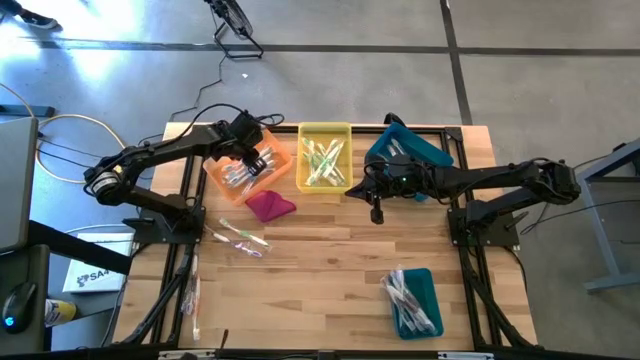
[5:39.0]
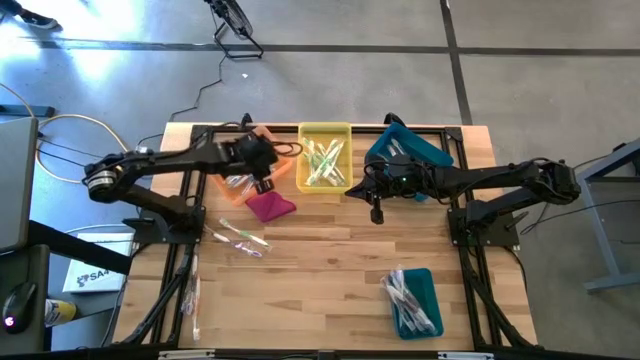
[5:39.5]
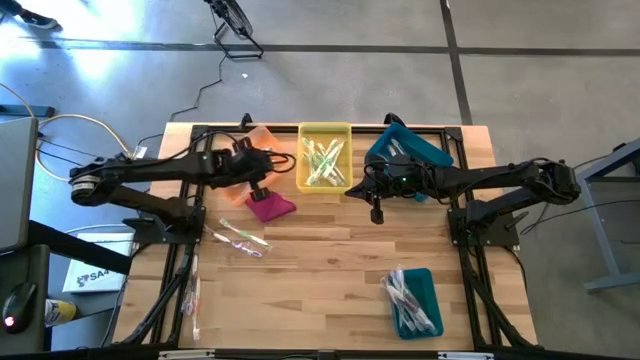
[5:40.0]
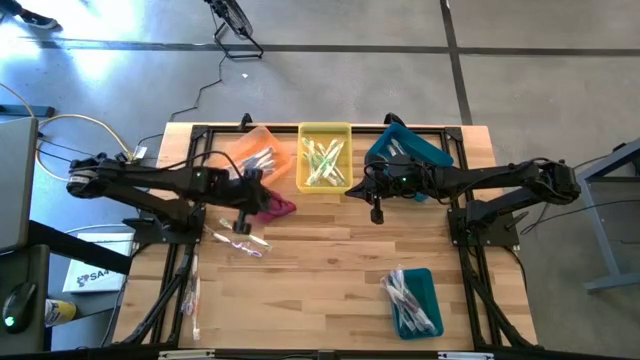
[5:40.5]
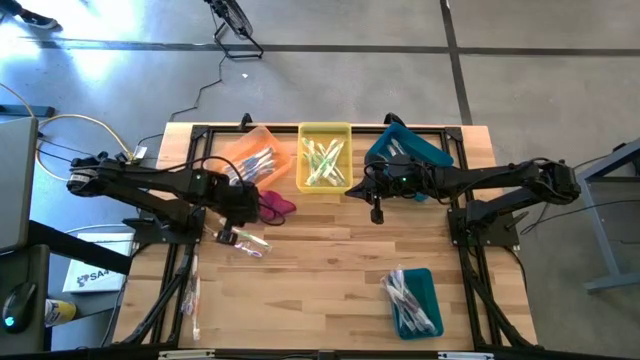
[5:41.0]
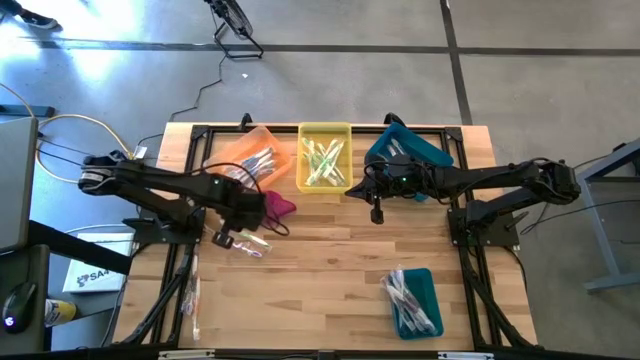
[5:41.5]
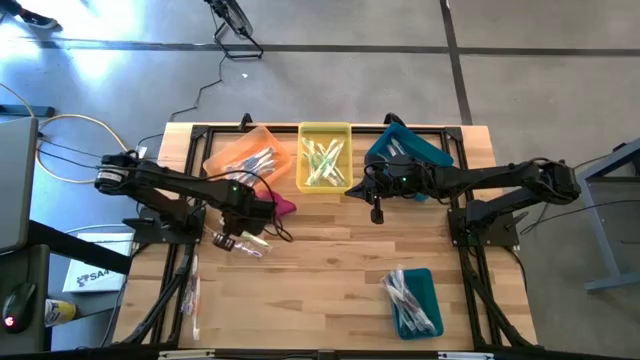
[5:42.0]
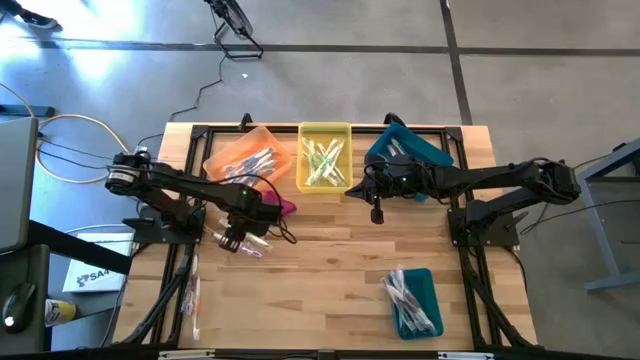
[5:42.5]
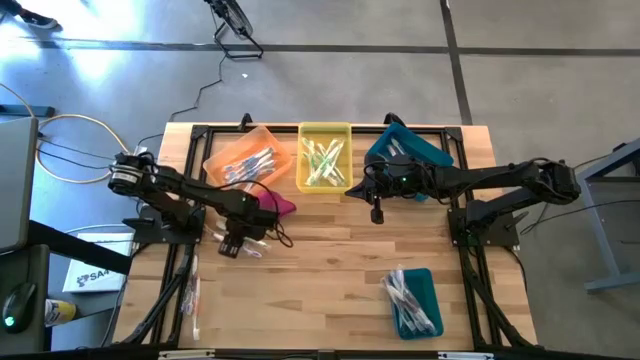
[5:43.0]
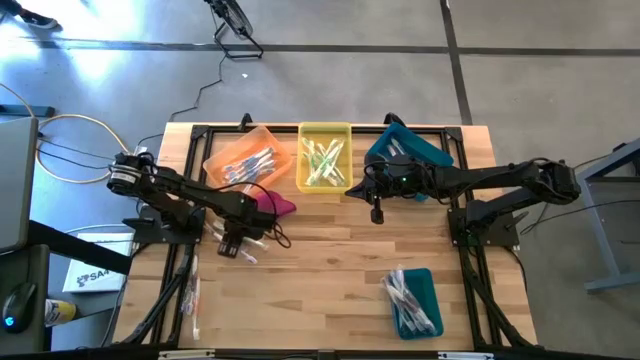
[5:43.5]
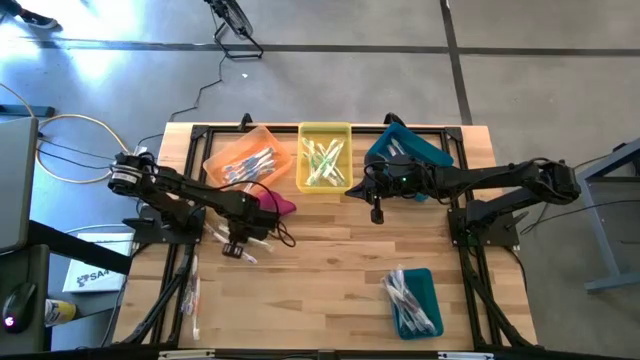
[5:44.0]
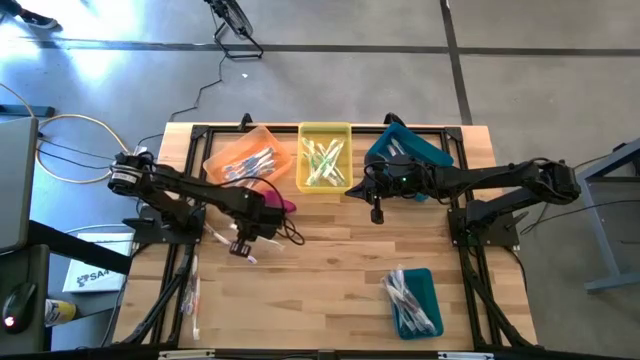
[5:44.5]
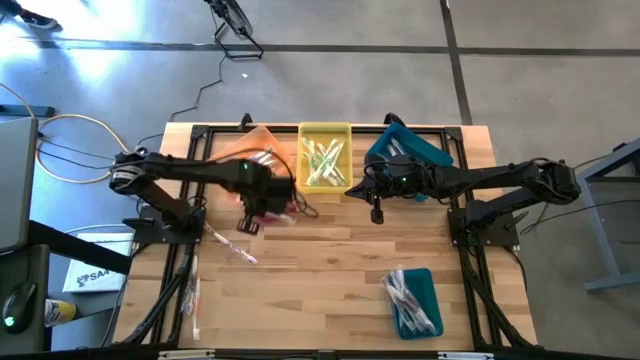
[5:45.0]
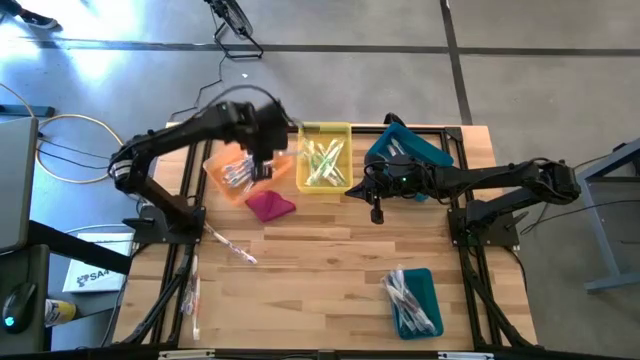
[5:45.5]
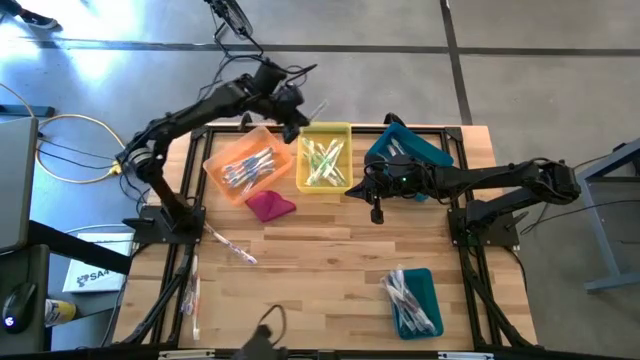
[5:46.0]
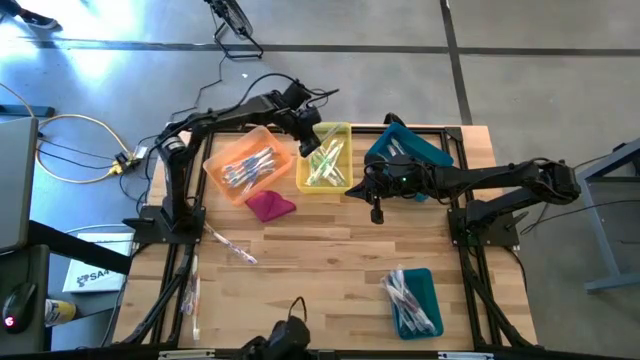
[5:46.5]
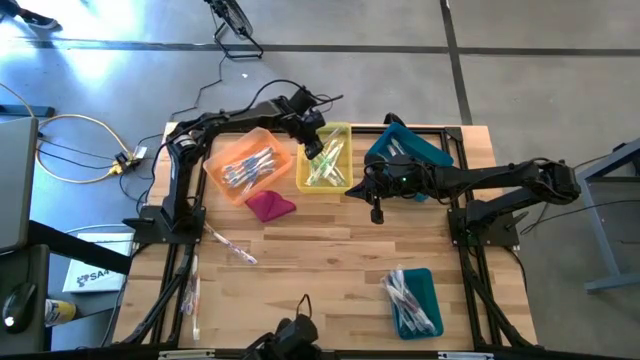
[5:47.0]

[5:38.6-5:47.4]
Task: Pick & Place Toothbrushes
Put the green toothbrush into the yellow bin

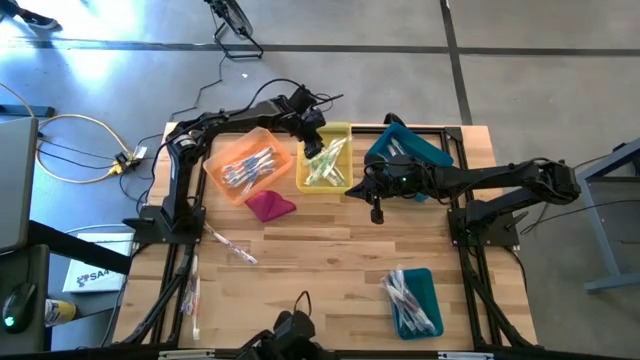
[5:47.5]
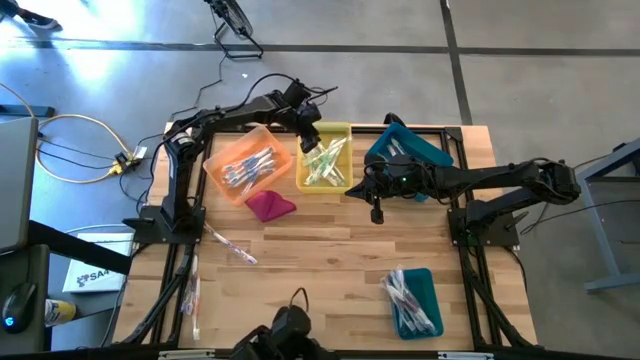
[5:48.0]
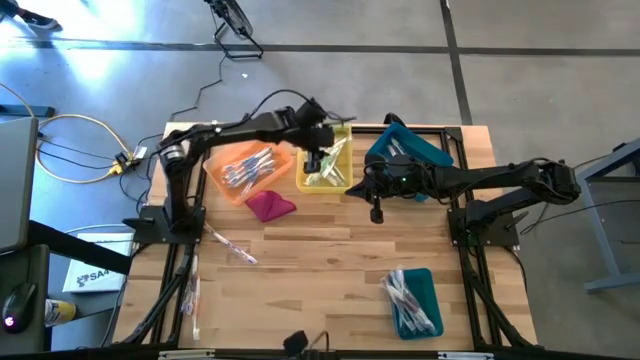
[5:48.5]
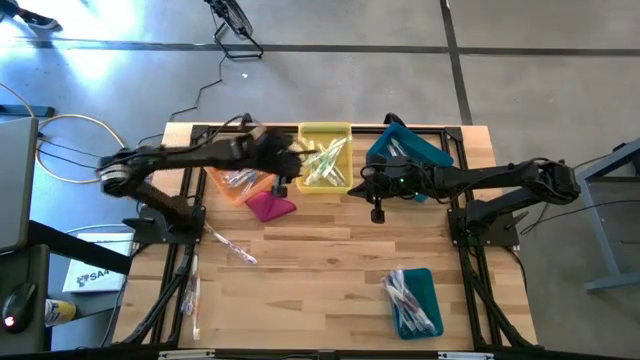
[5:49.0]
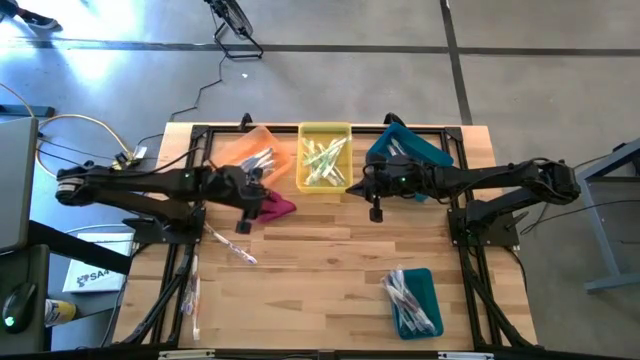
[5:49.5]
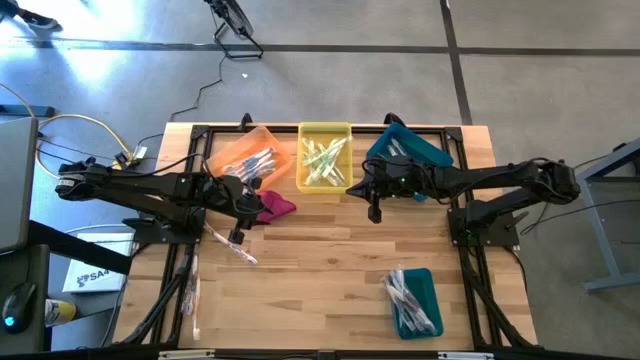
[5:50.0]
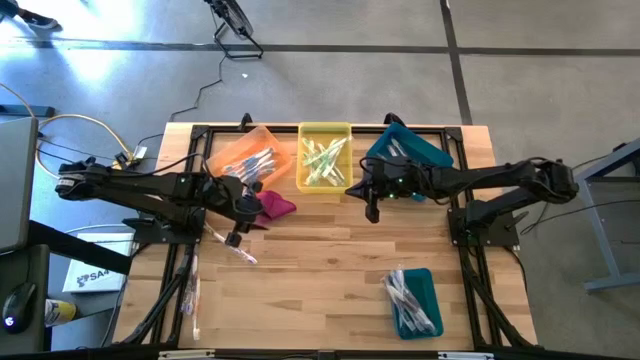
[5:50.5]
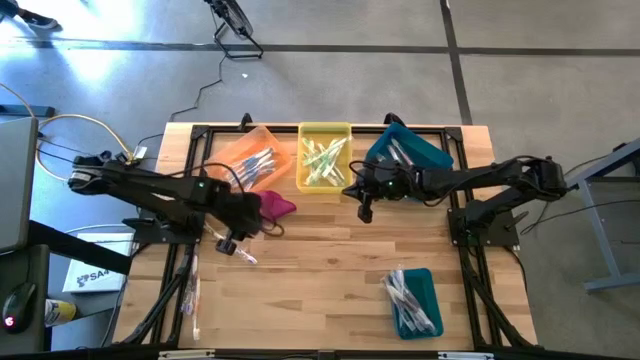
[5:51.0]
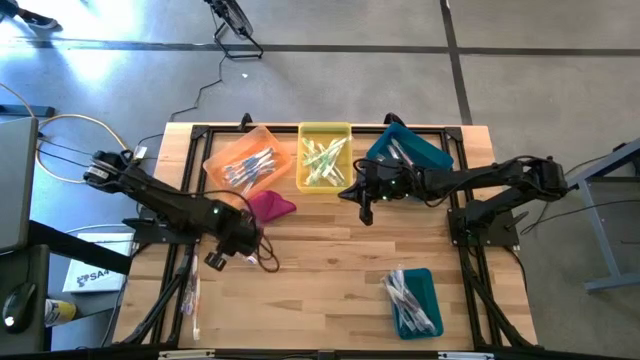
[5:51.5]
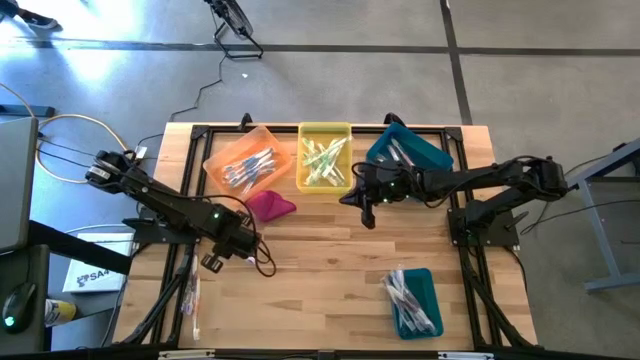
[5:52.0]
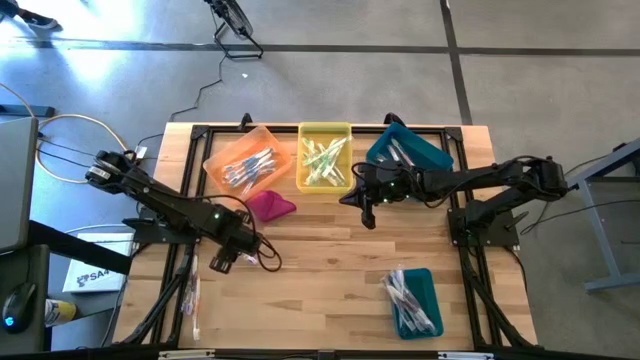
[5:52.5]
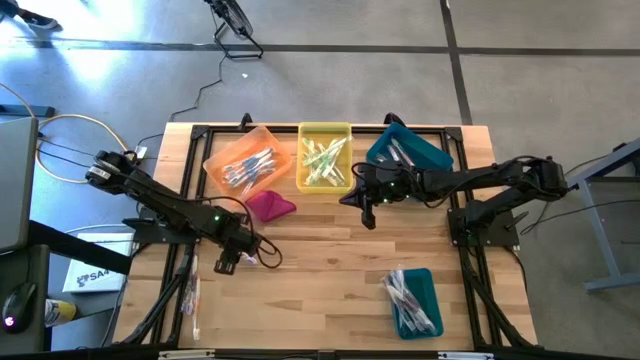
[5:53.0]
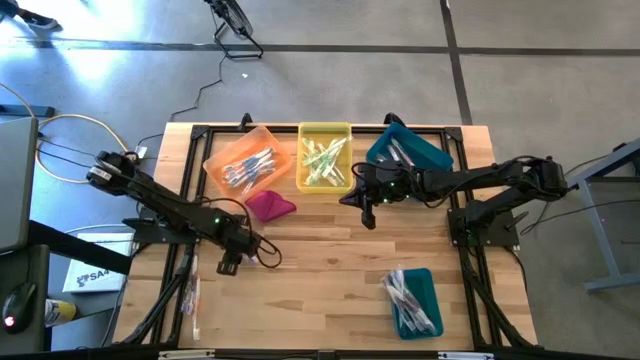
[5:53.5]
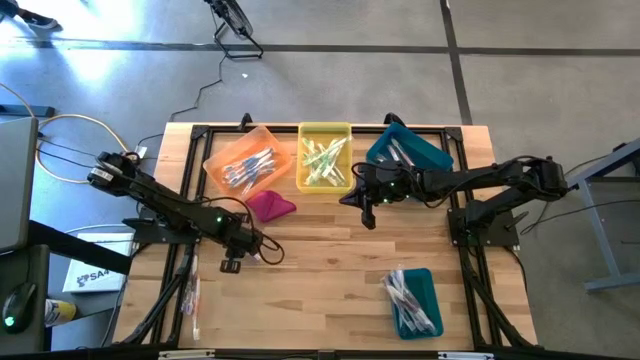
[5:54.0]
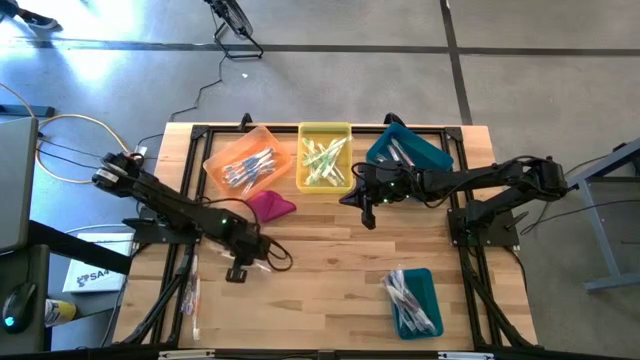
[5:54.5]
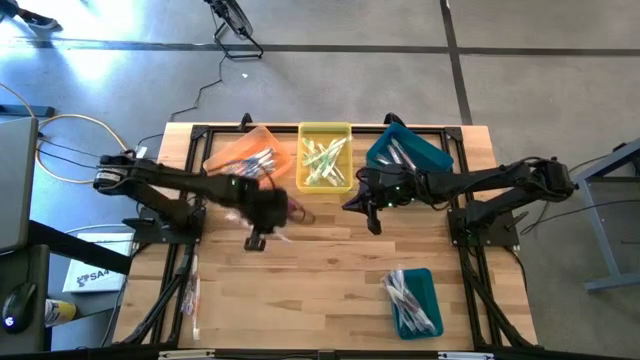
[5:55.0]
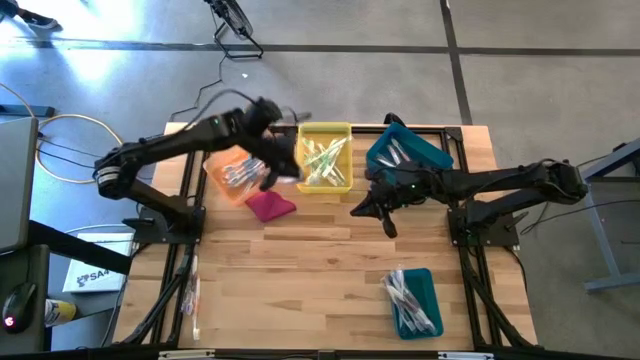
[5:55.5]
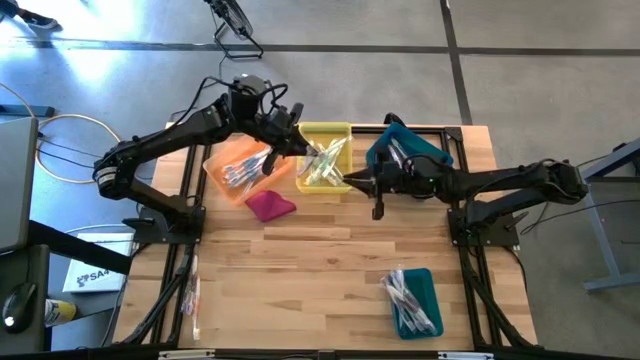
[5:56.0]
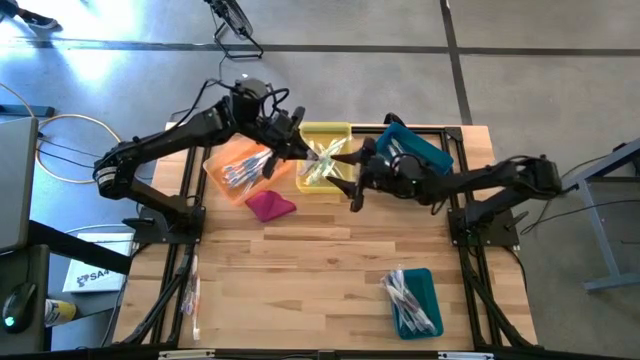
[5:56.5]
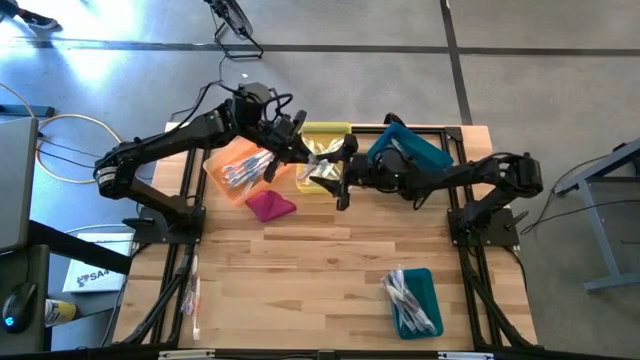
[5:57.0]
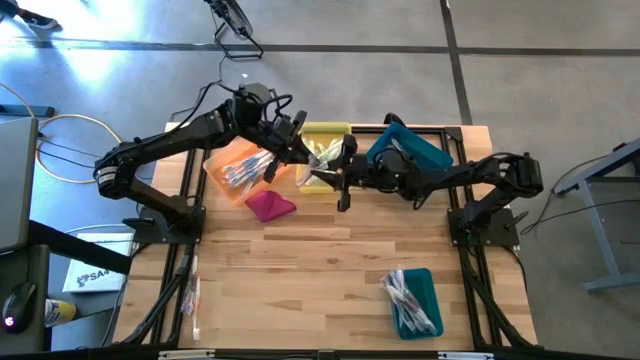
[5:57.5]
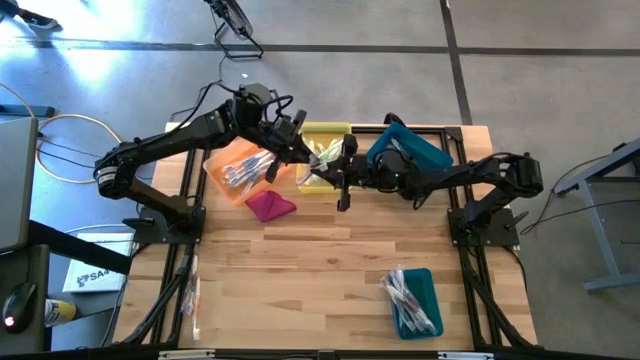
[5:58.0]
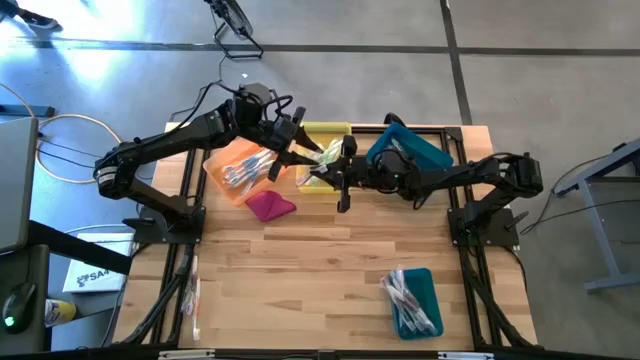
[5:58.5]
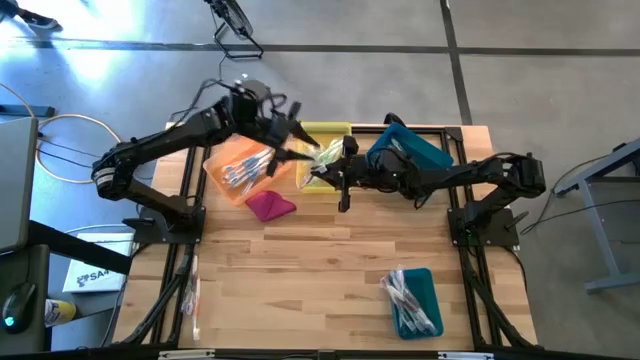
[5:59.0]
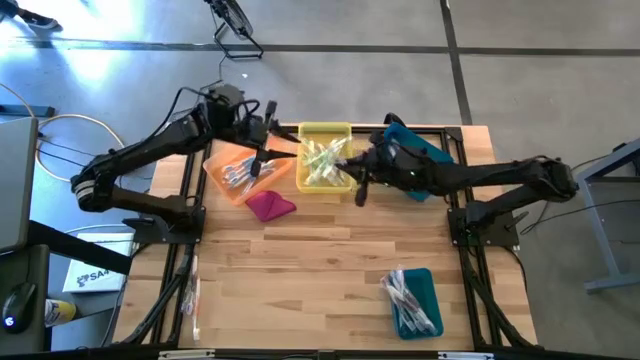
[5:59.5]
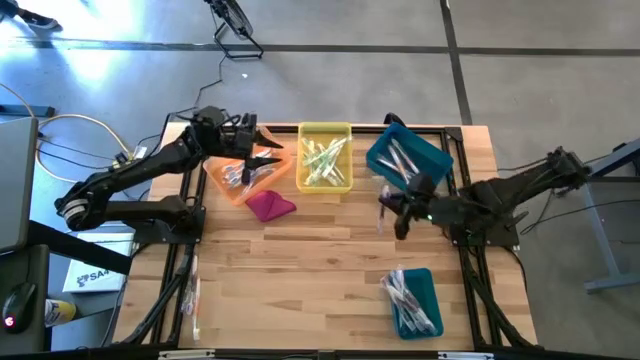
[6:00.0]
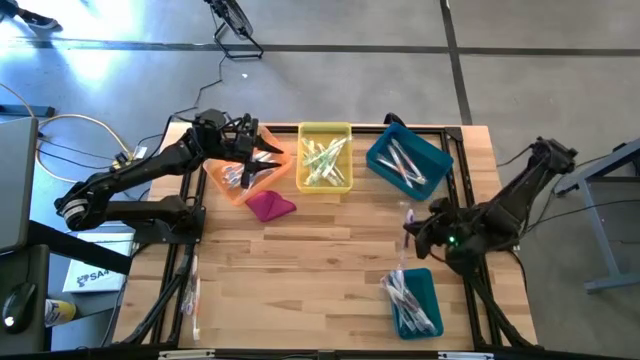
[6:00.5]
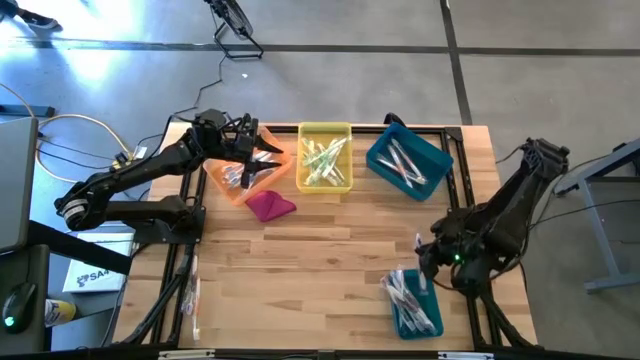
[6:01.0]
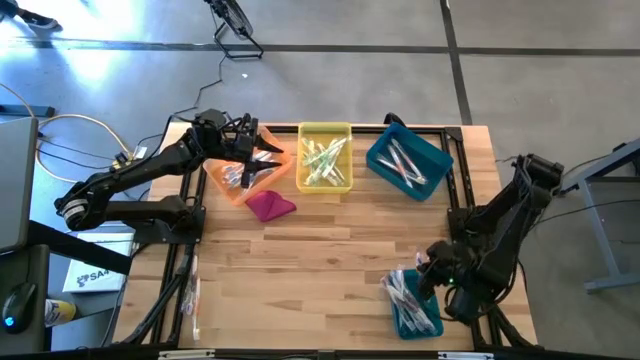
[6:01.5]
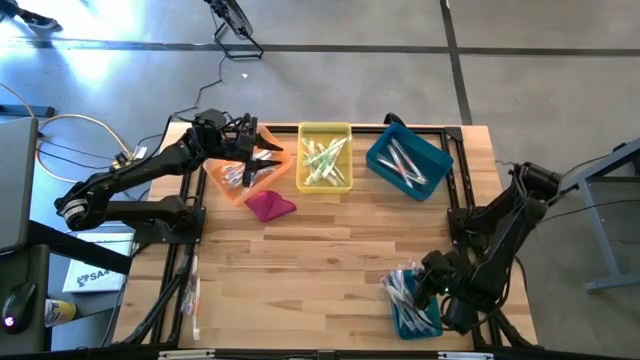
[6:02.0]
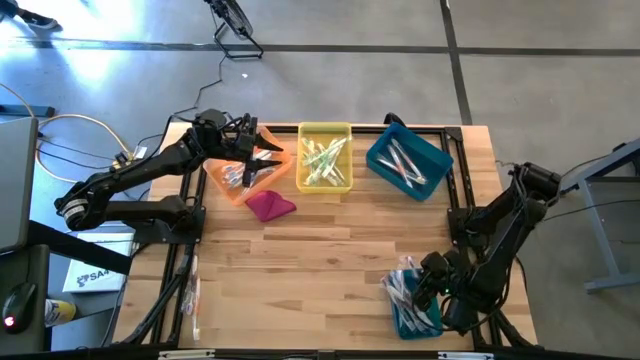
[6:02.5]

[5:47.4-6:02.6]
Put the purple toothbrush into the bottom blue bin
